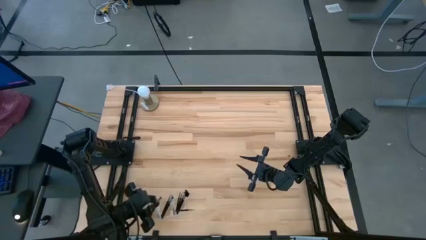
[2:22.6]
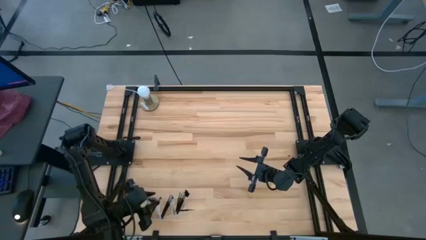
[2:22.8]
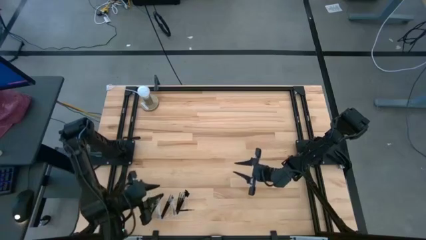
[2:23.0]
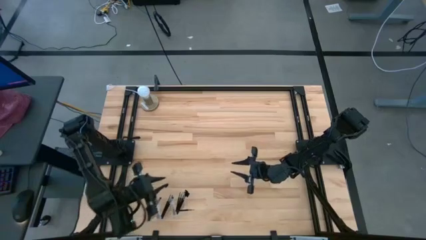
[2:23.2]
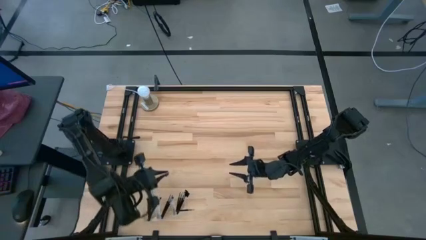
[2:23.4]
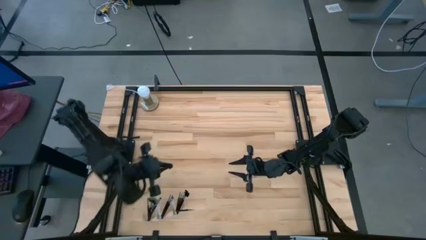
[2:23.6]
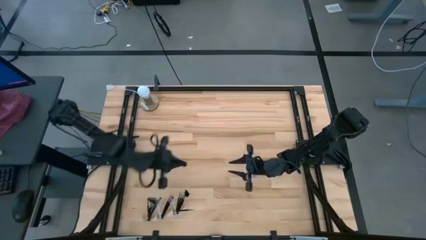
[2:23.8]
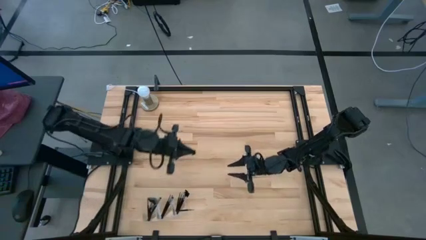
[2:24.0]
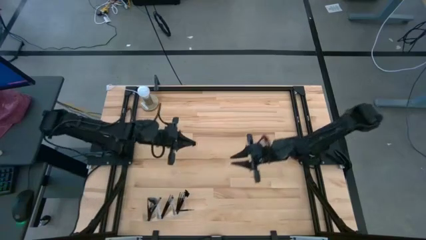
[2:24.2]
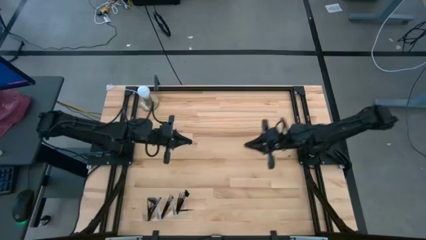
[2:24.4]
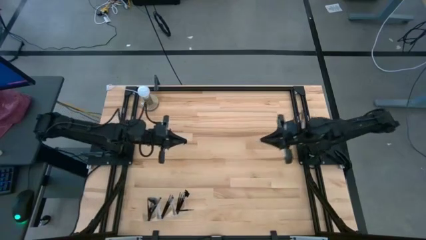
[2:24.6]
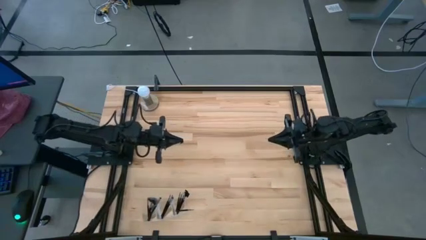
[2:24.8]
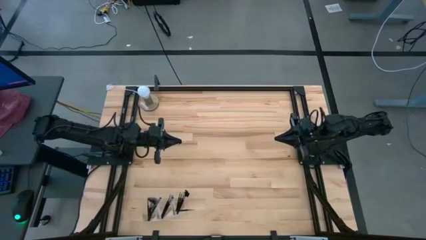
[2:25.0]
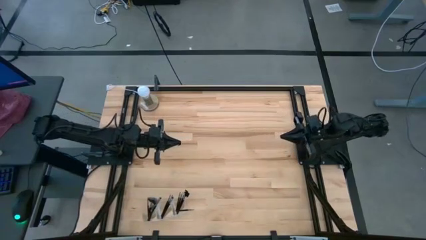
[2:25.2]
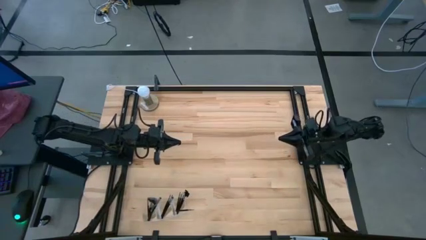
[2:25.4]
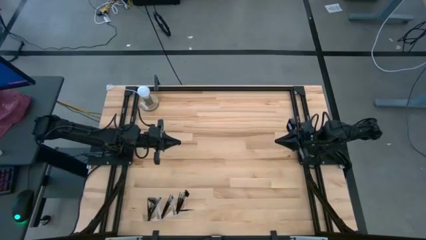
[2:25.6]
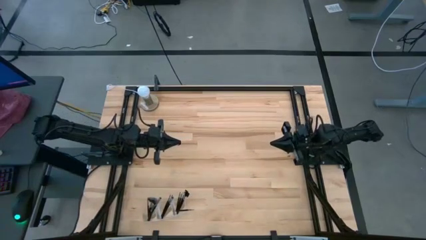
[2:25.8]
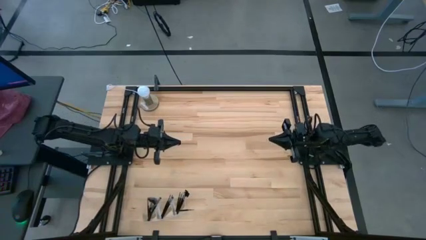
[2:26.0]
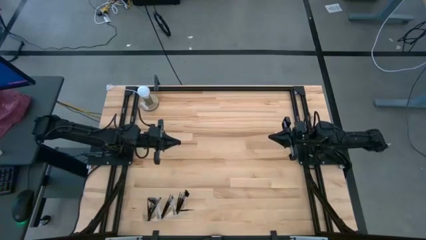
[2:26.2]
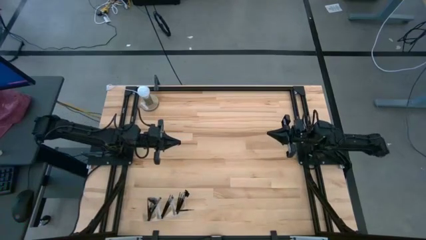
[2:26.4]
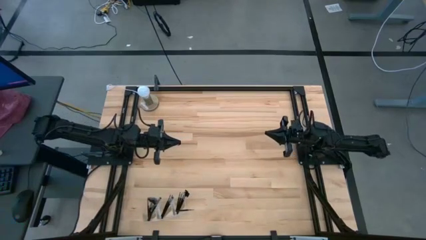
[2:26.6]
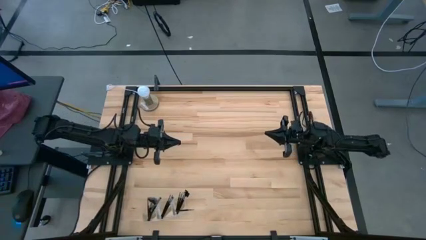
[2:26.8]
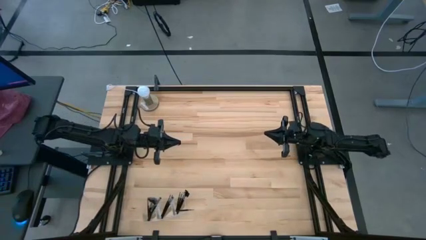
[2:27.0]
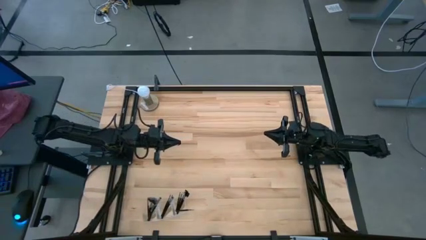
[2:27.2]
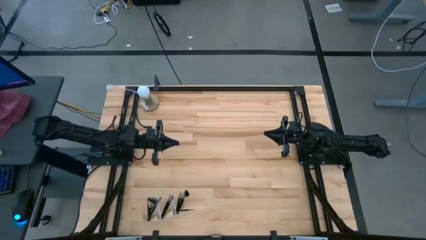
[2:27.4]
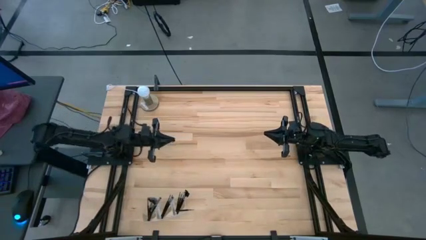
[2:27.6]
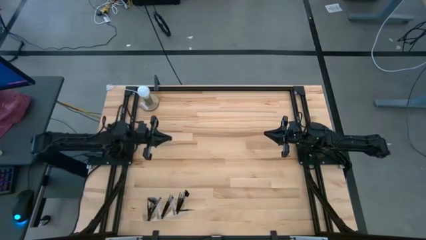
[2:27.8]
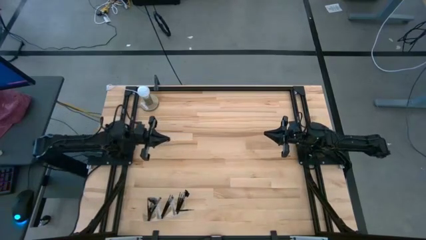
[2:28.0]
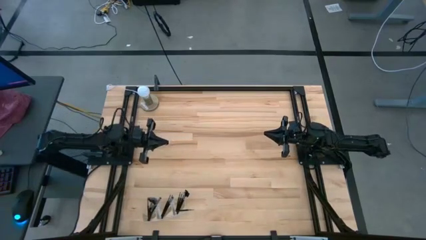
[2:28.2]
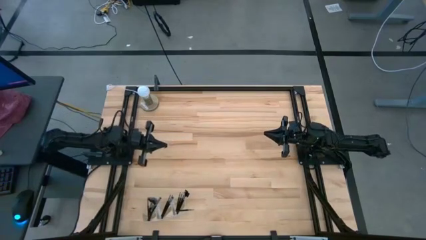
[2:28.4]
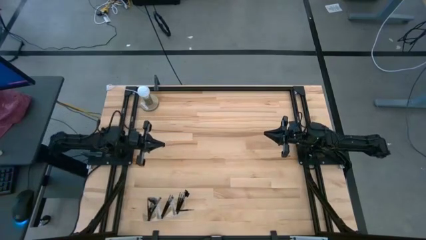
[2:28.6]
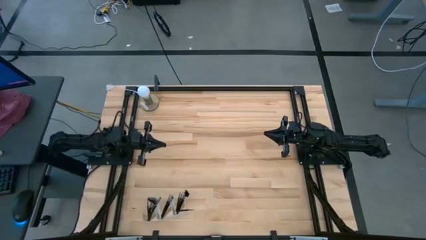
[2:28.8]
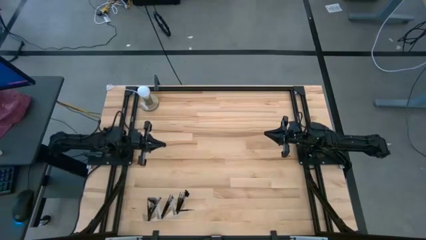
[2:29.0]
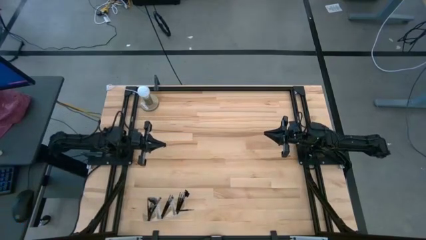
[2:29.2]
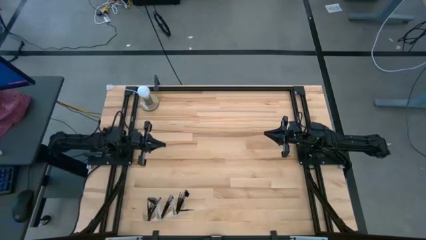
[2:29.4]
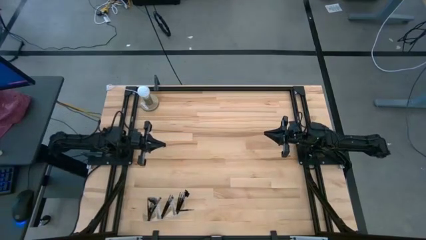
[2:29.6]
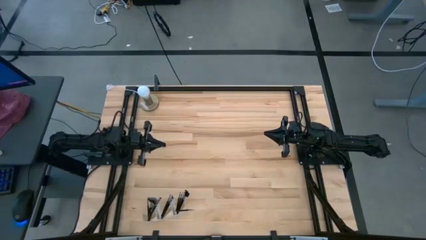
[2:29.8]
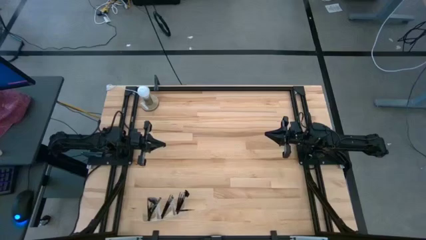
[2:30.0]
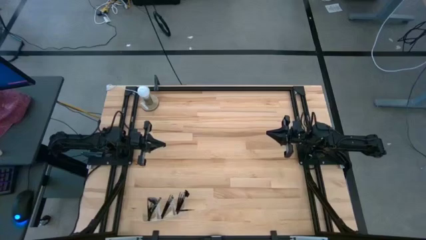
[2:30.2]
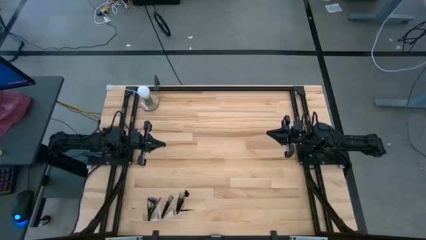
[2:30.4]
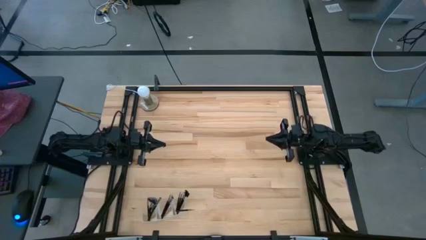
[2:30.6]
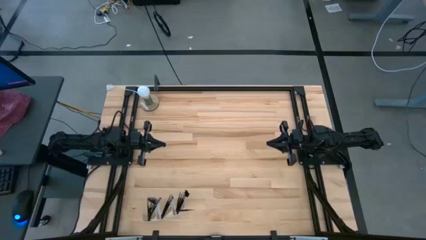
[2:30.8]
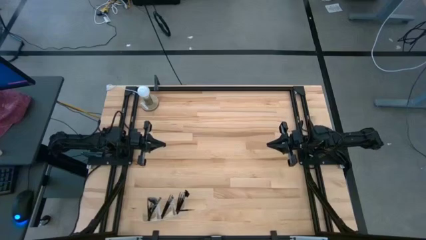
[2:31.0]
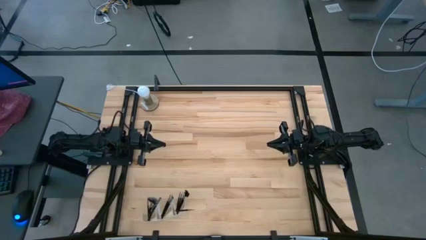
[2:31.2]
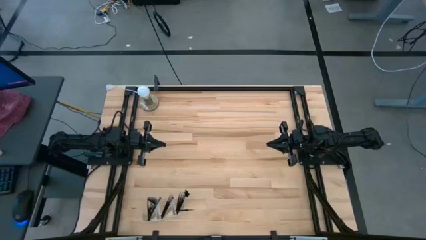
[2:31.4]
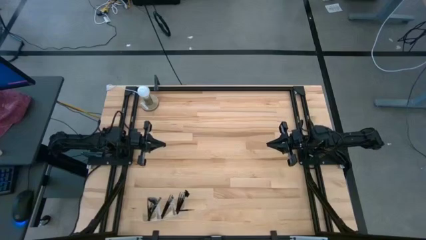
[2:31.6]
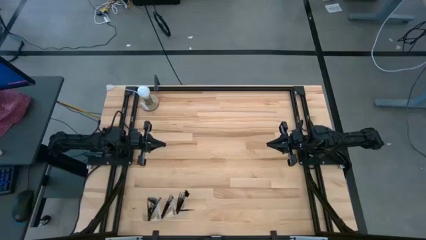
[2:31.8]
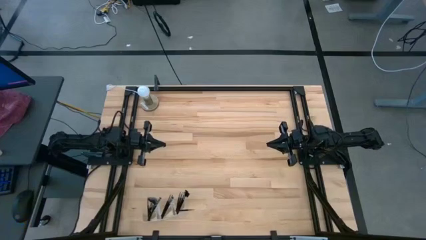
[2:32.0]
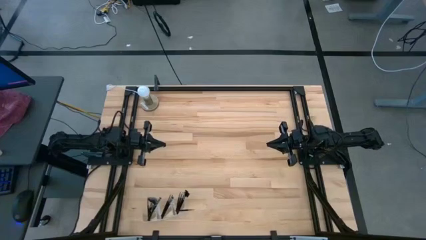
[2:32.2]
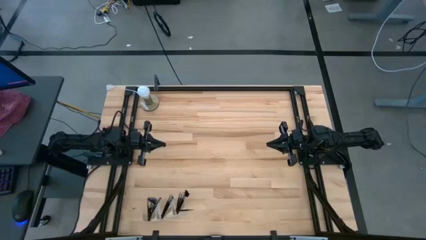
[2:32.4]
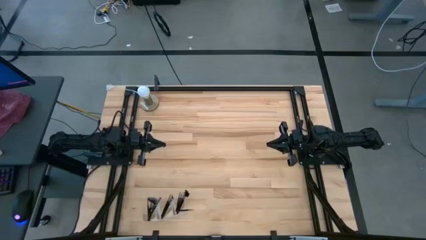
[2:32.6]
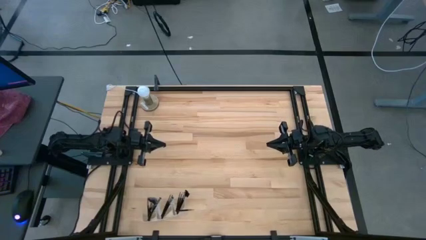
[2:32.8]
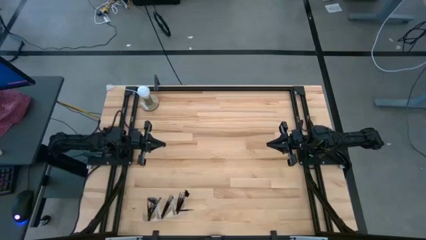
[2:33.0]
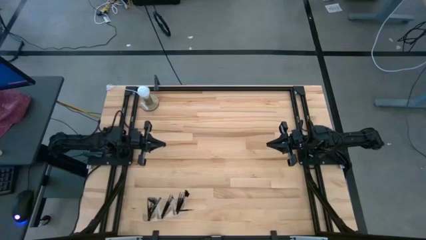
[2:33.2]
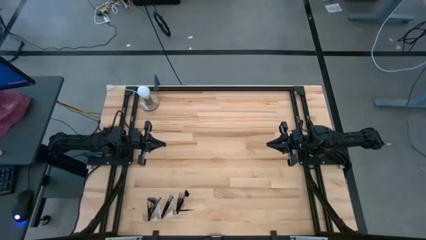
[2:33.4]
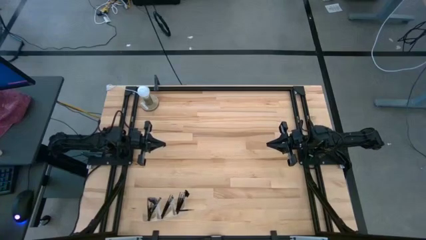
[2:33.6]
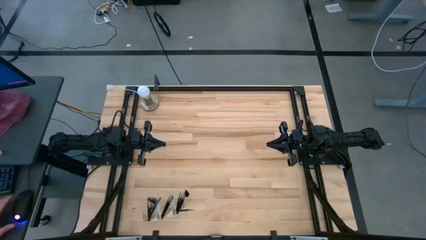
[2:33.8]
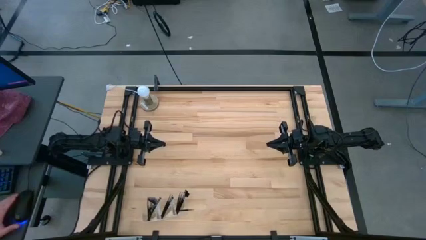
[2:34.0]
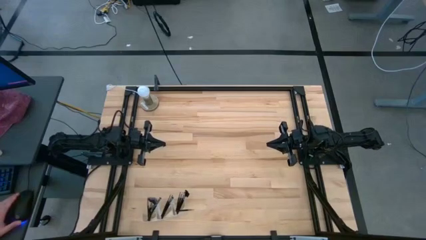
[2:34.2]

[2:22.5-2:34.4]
Task: Put items in baskets/containers
Return to Home Position

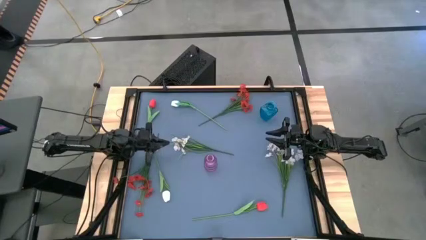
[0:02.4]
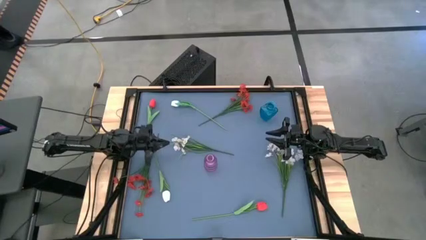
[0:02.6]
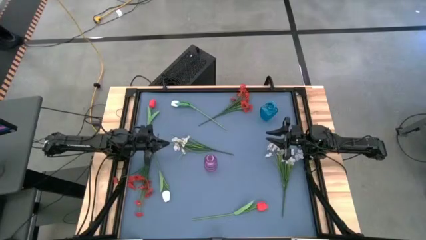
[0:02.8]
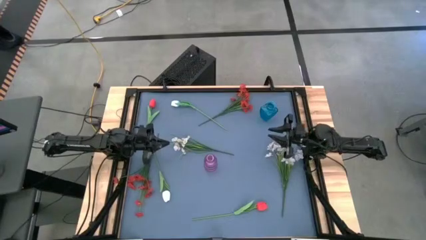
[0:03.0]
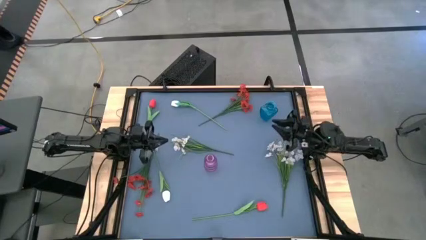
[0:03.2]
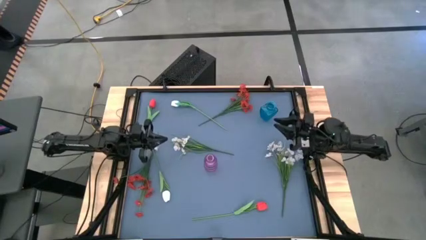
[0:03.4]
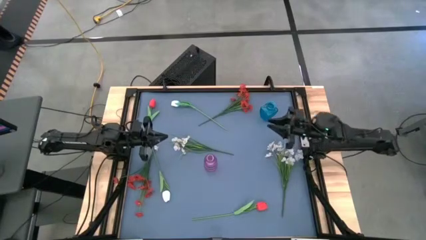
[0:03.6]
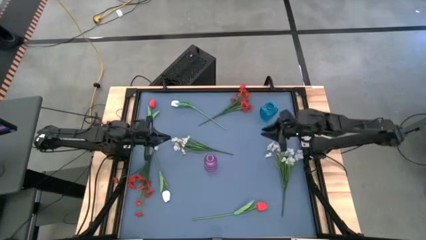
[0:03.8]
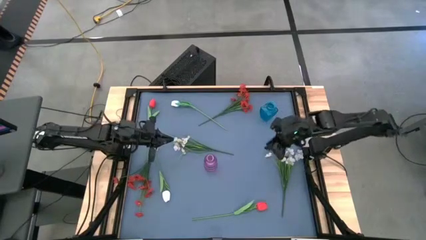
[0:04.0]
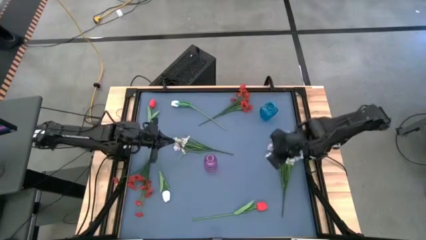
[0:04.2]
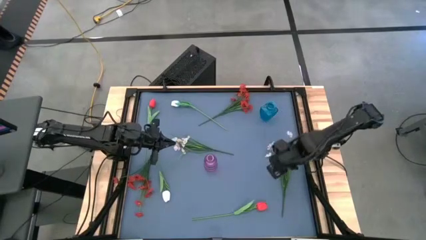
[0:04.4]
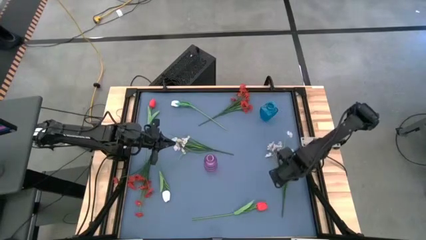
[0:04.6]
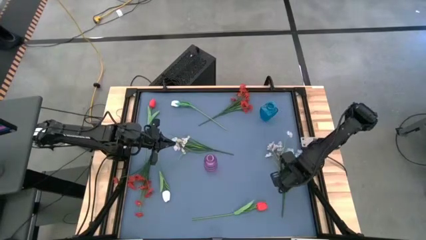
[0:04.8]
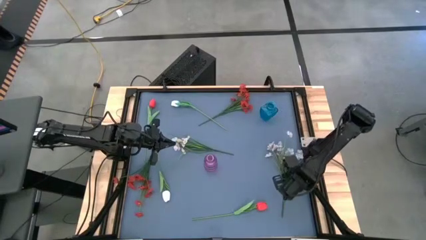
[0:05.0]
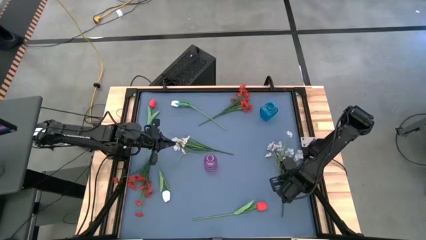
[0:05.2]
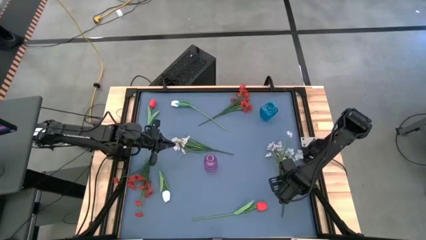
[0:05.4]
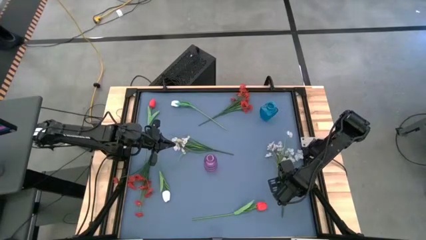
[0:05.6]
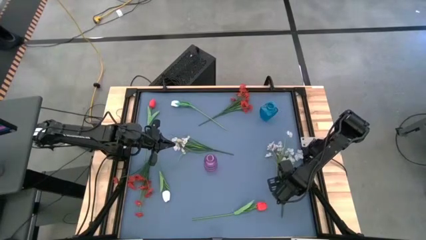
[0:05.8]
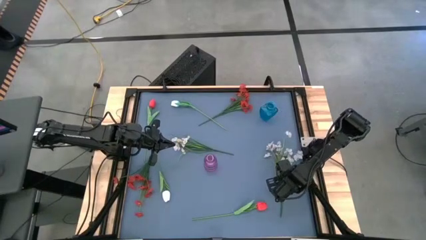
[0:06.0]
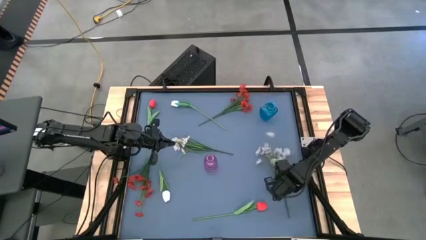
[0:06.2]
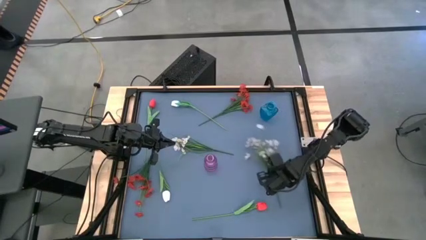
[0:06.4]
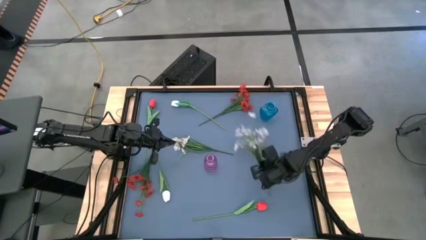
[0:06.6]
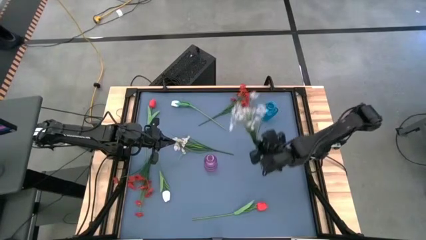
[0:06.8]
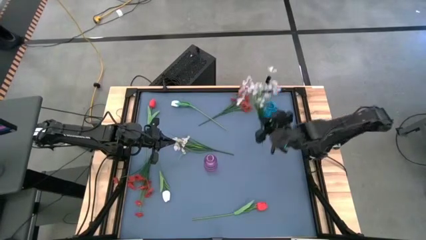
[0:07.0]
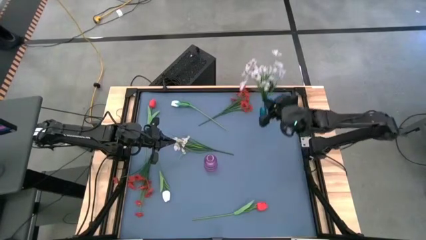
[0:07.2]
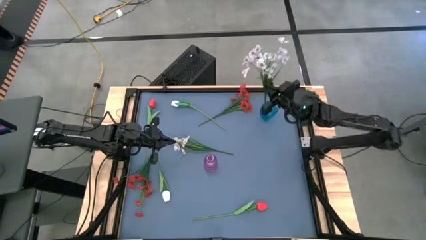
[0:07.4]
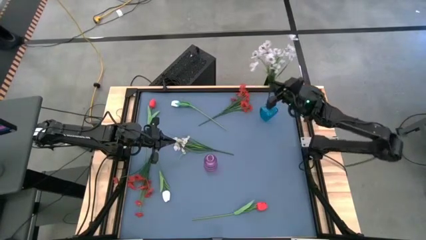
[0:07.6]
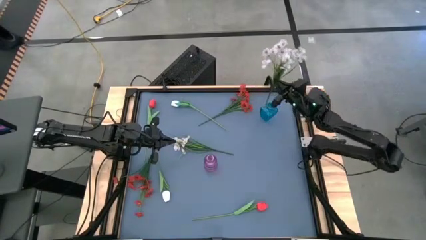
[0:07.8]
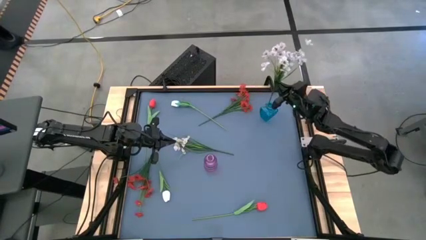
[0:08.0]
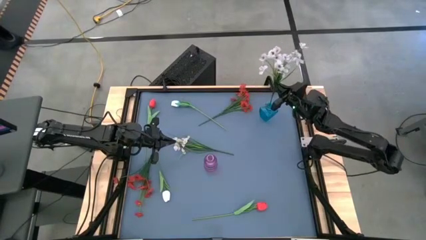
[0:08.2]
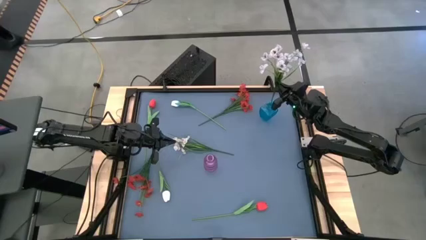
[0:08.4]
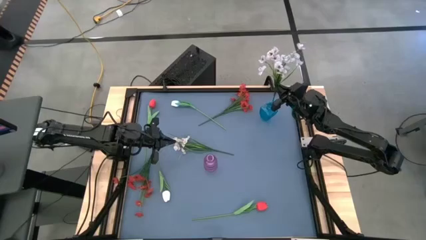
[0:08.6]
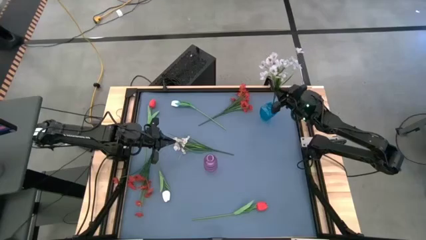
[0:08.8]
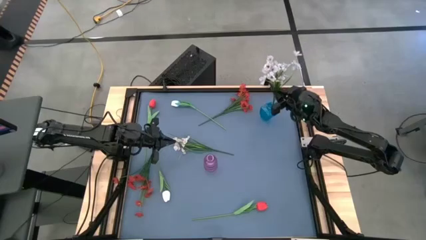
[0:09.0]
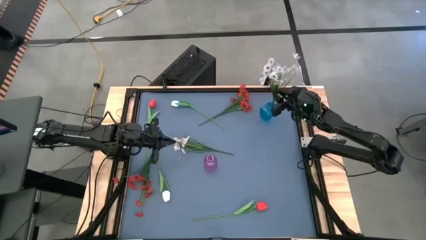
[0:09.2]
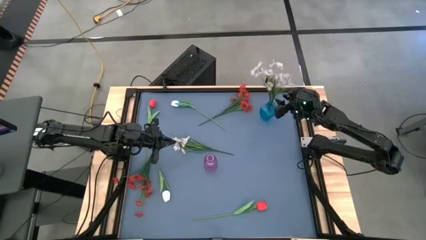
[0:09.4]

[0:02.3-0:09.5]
Task: Sort flowers into vase by color
Put the right white flowers into the blue vase
